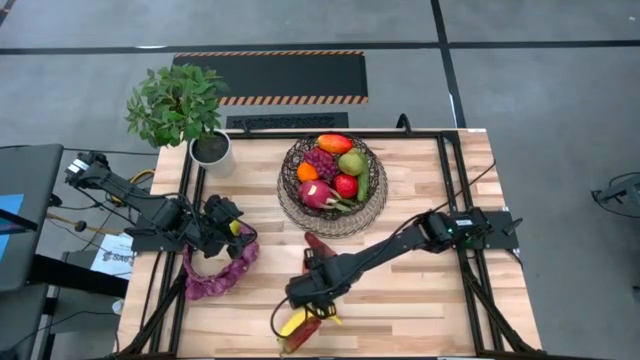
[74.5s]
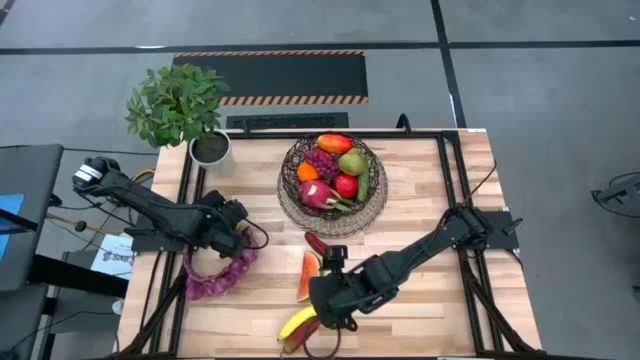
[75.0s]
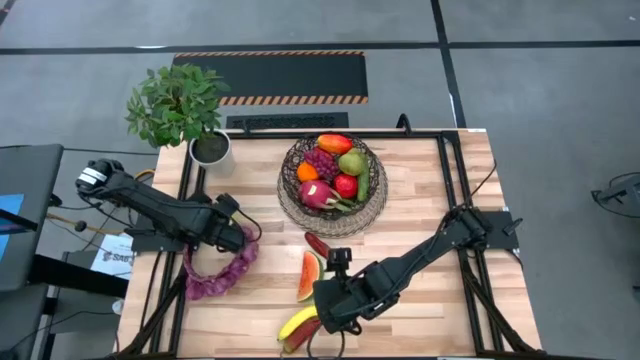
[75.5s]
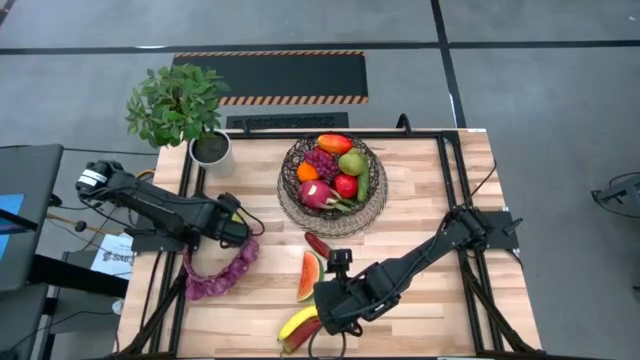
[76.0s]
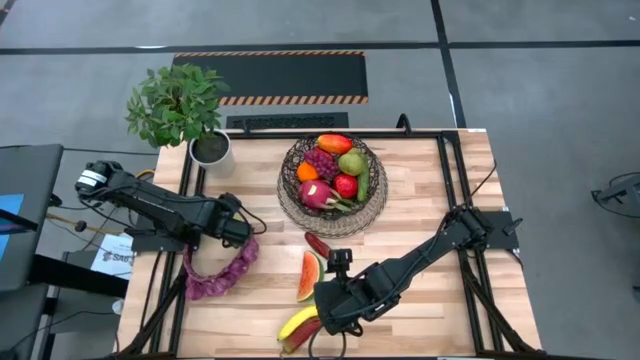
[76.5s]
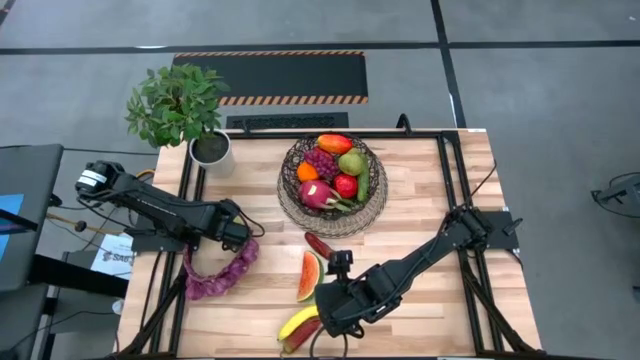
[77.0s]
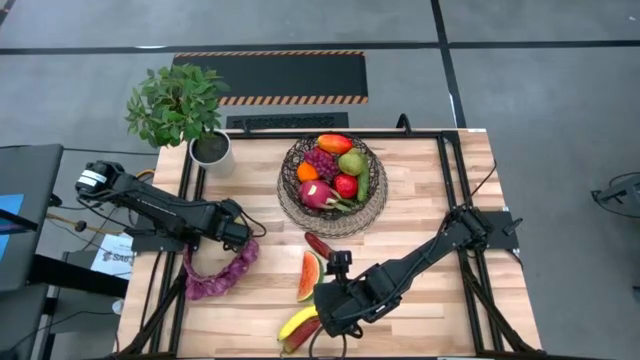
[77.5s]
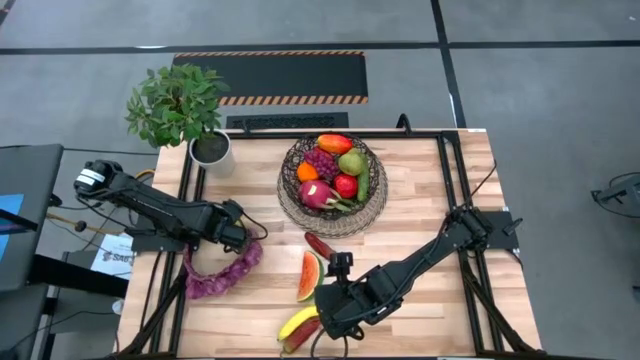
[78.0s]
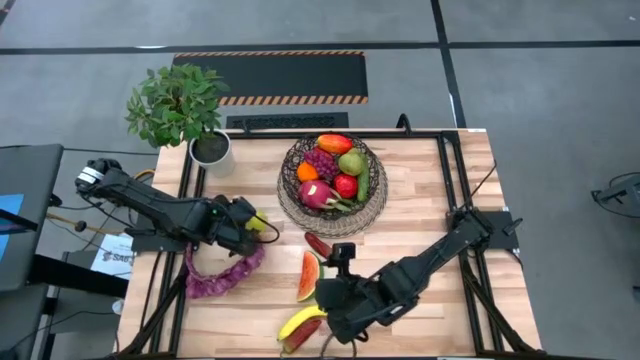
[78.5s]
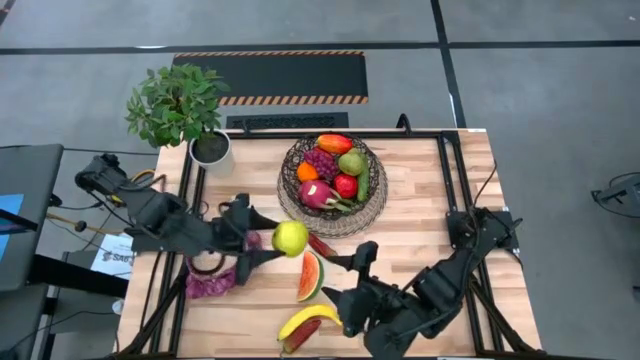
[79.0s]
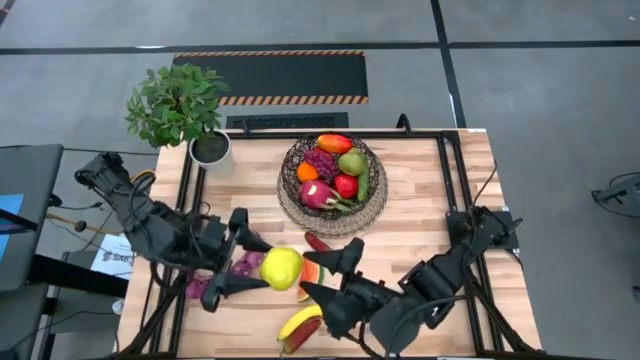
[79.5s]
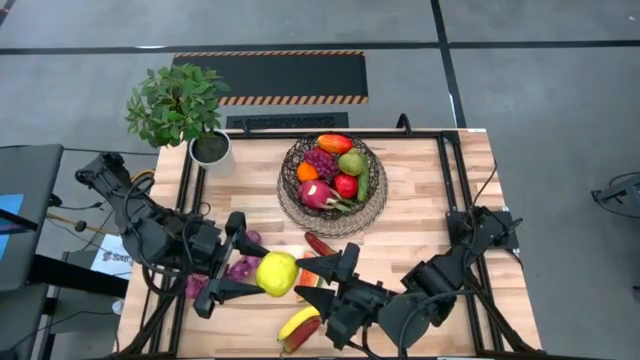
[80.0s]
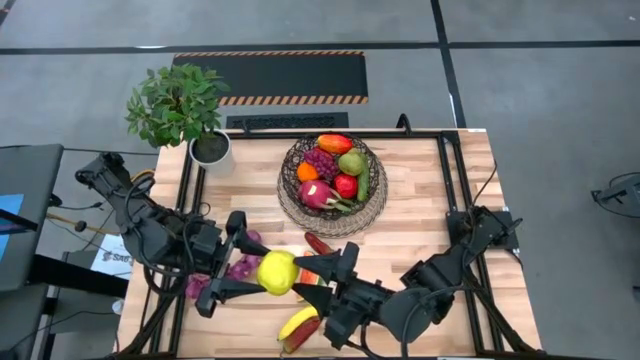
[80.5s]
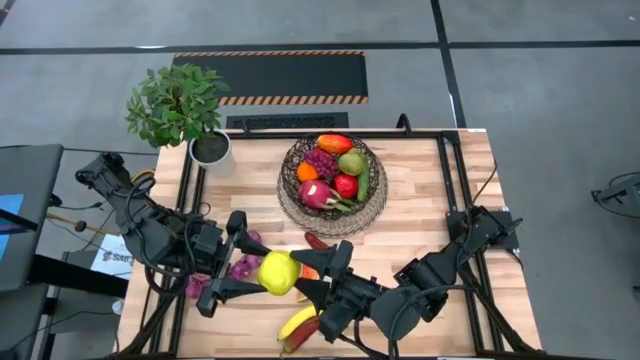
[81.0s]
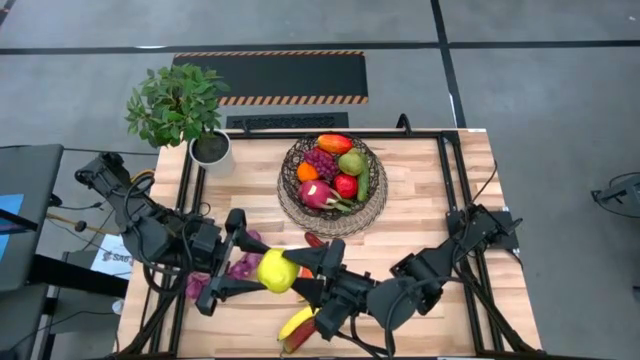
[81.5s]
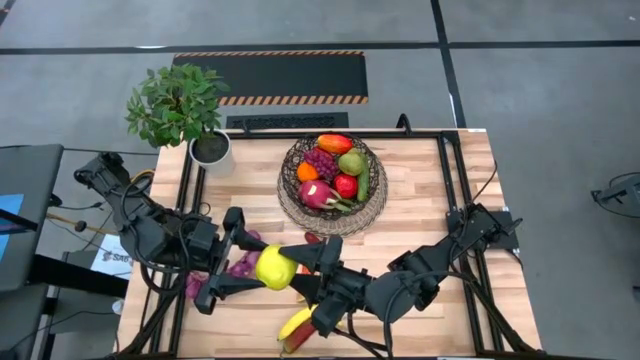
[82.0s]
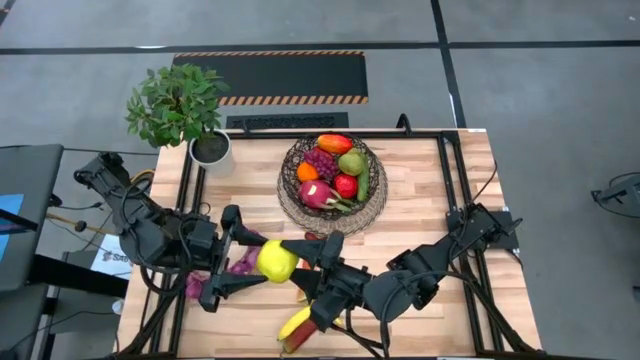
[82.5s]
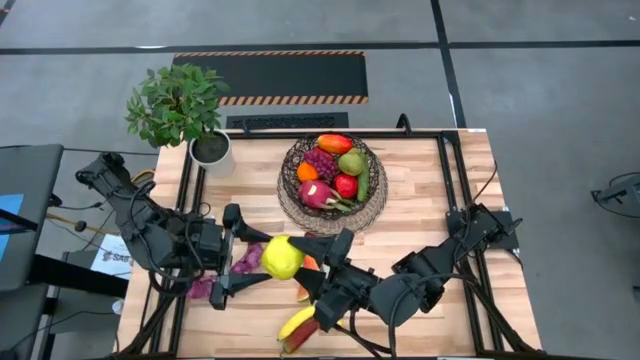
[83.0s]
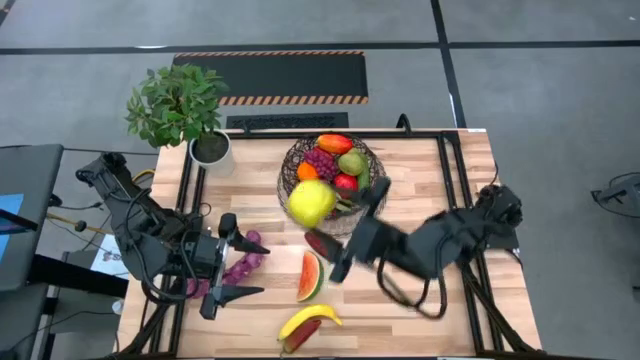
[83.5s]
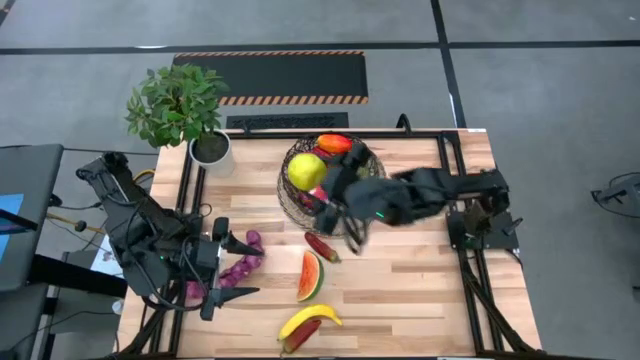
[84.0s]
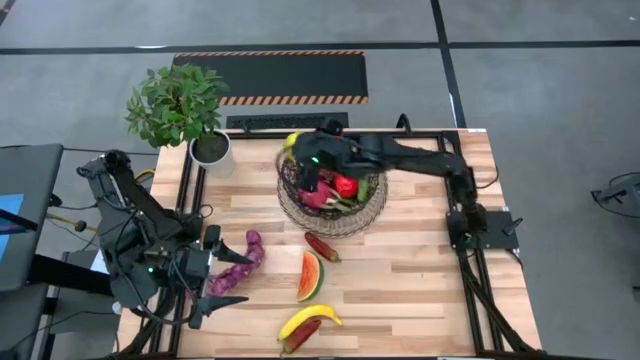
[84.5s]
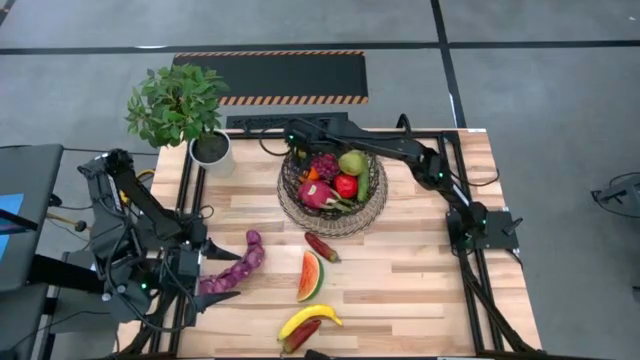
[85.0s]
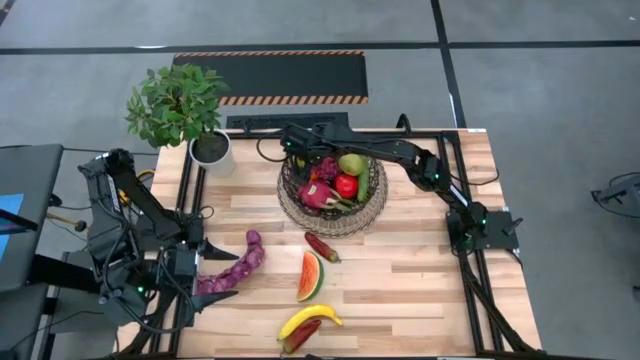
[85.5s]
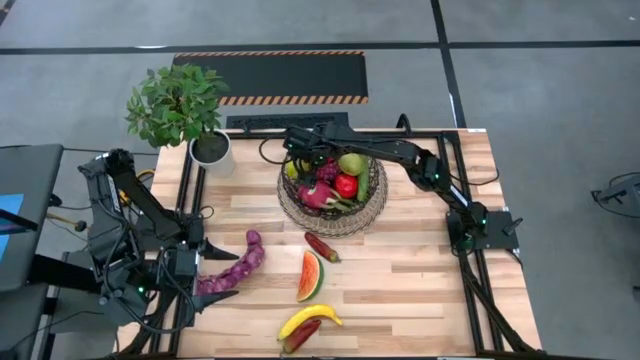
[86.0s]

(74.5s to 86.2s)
Task: Build produce basket
Put the green apple into the basket

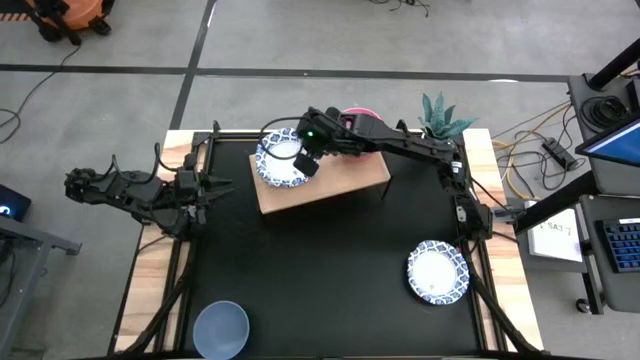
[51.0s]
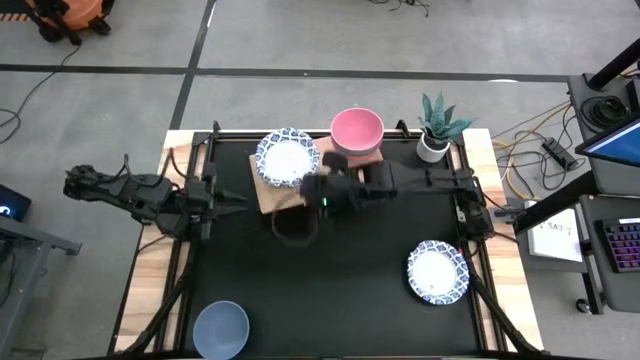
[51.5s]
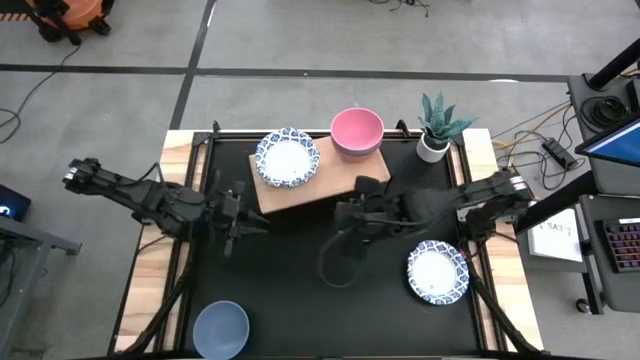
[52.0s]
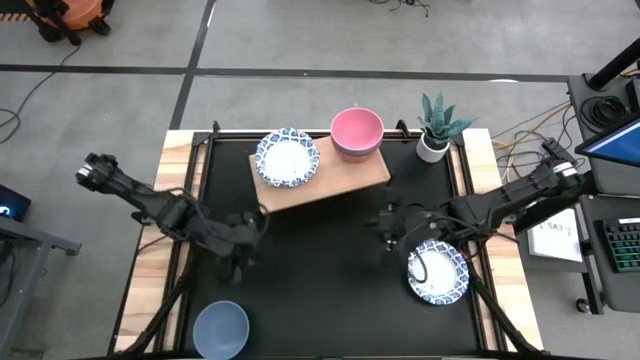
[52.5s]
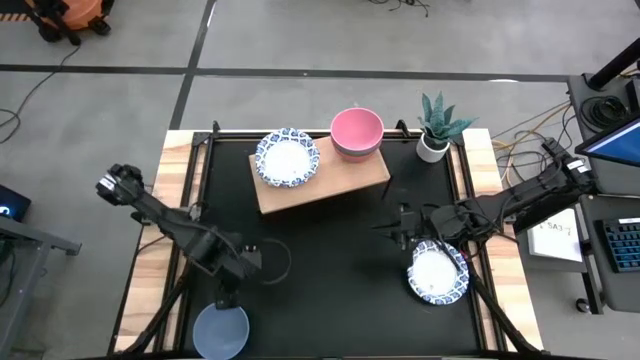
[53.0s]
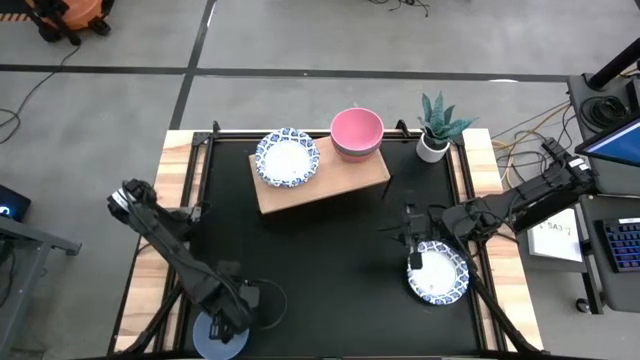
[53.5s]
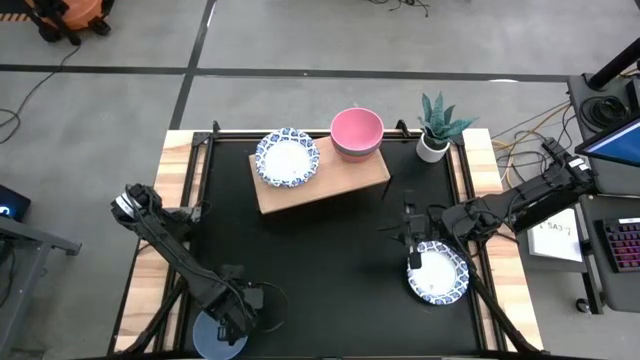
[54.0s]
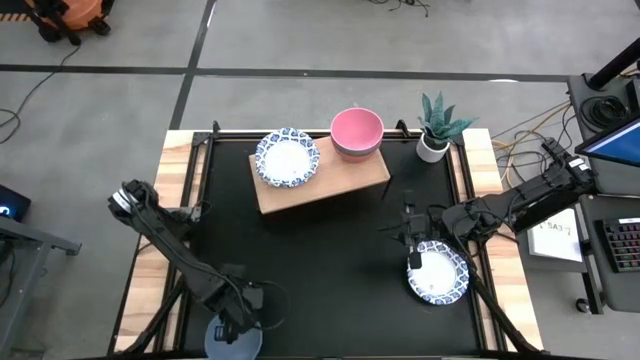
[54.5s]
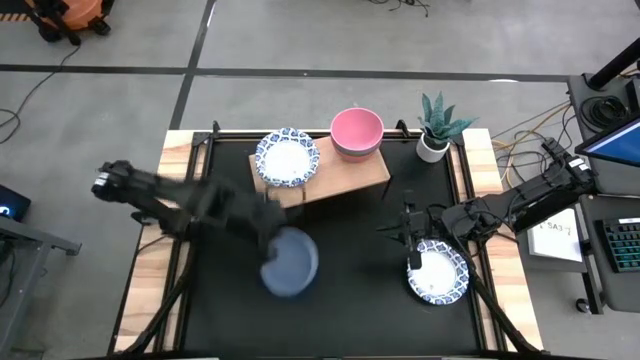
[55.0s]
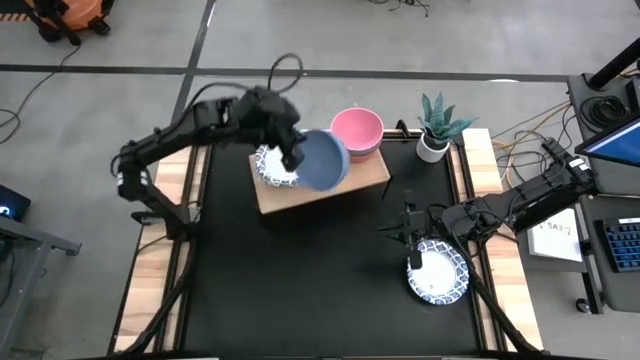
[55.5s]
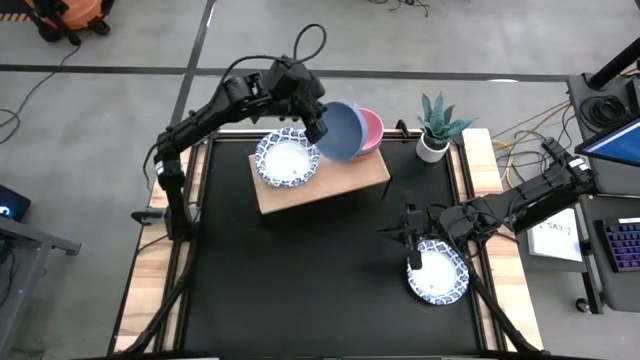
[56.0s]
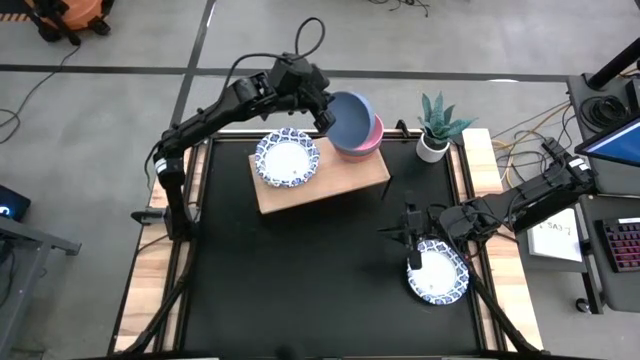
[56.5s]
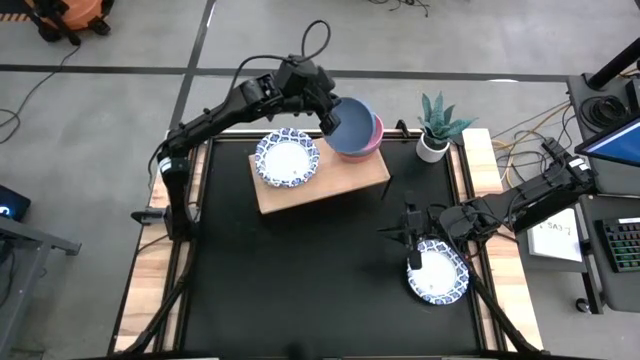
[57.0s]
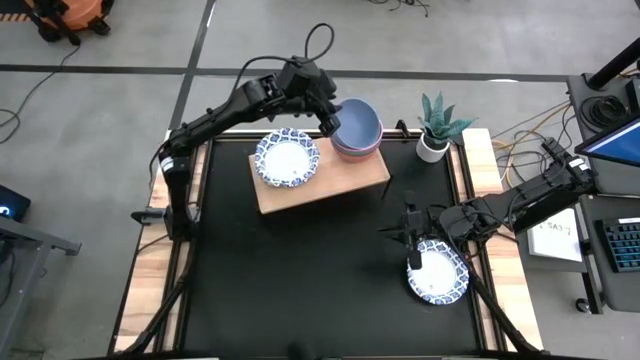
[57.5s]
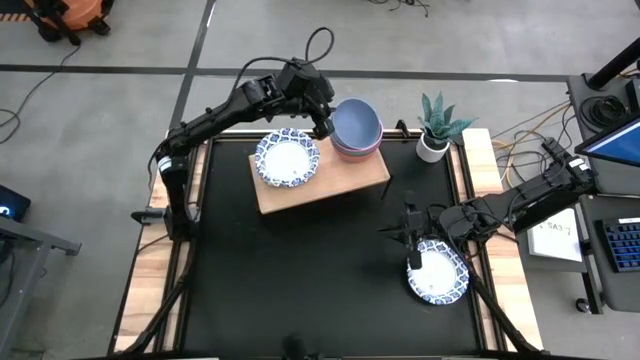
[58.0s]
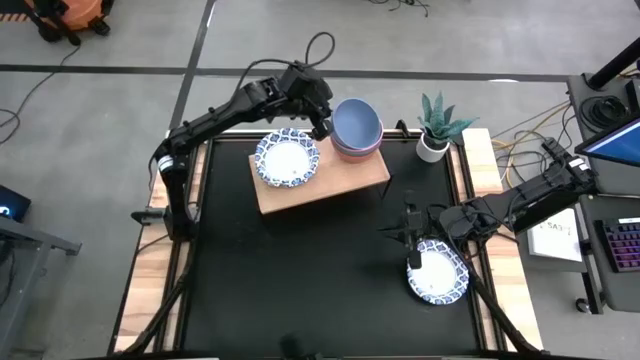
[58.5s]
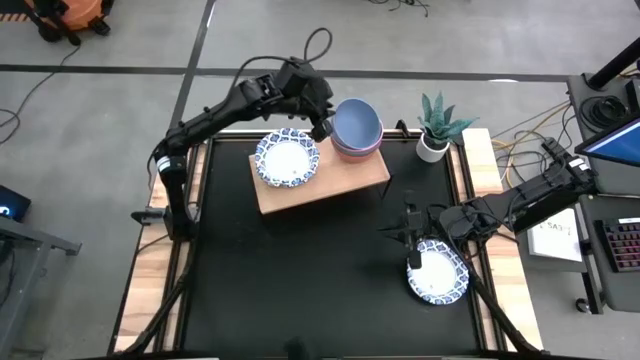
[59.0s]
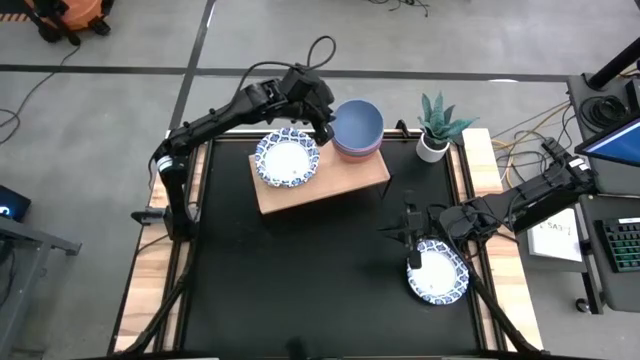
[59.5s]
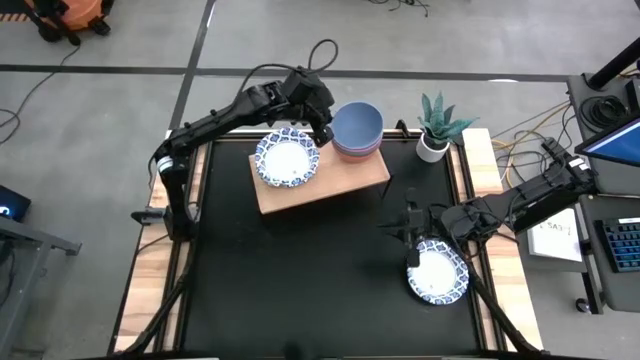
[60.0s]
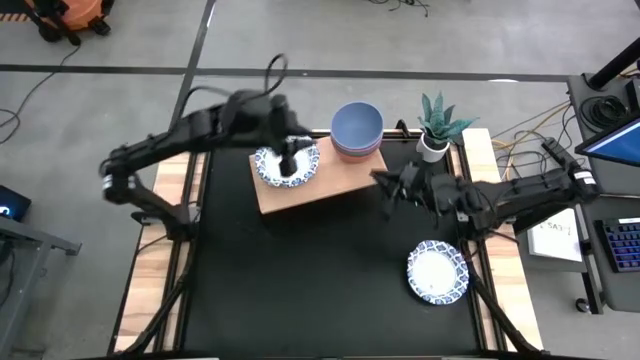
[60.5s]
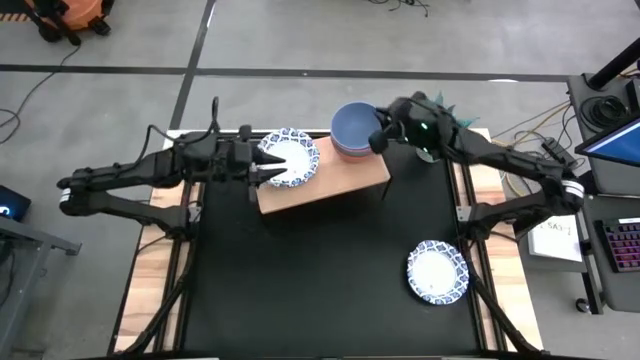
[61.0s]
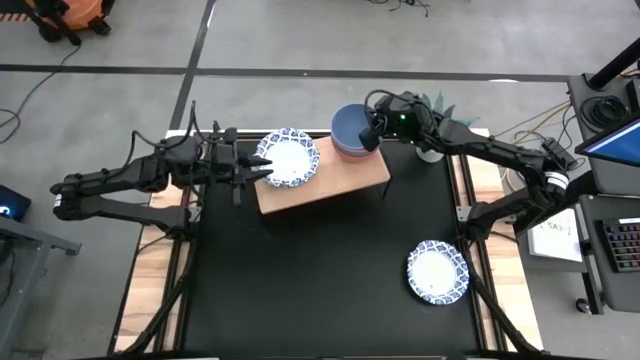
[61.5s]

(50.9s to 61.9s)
Task: Place and stack bowls onto a shelf
Stack the blue bowl on top of the pink bowl on the shelf
